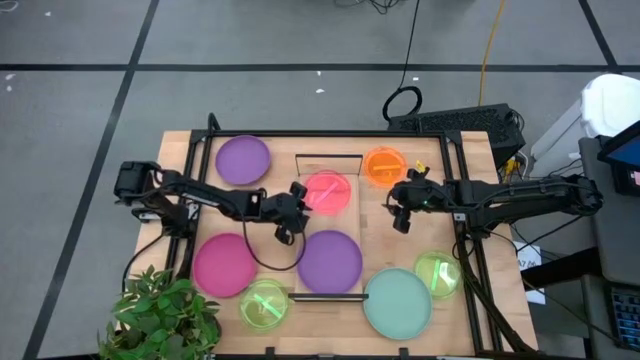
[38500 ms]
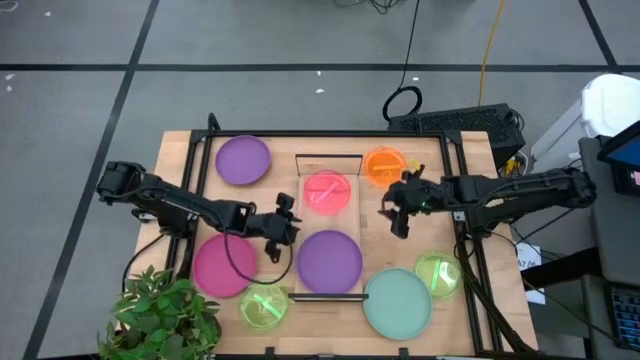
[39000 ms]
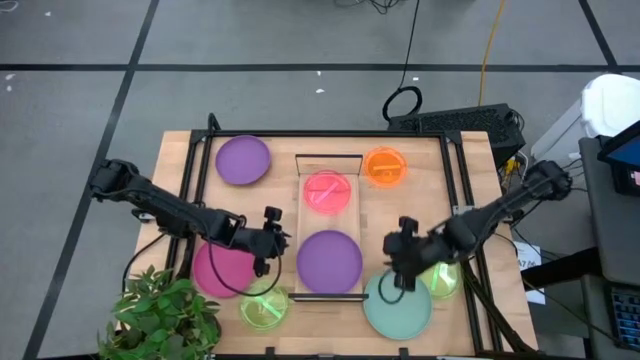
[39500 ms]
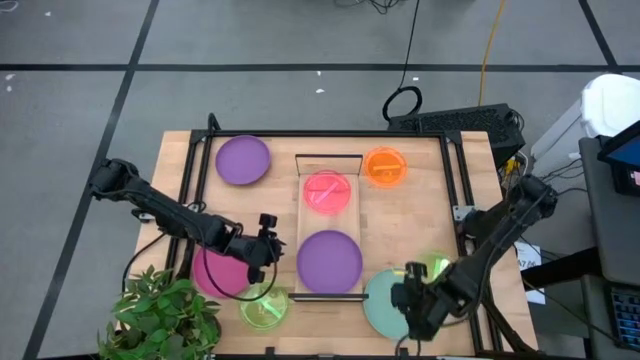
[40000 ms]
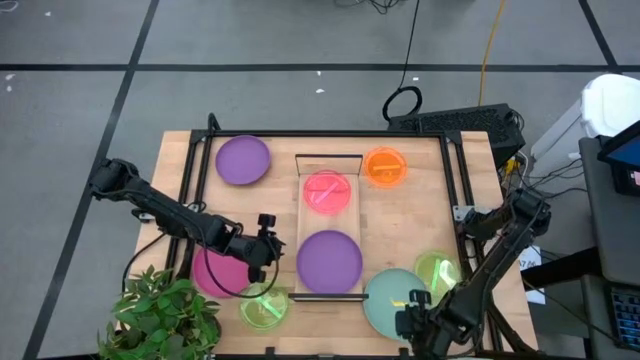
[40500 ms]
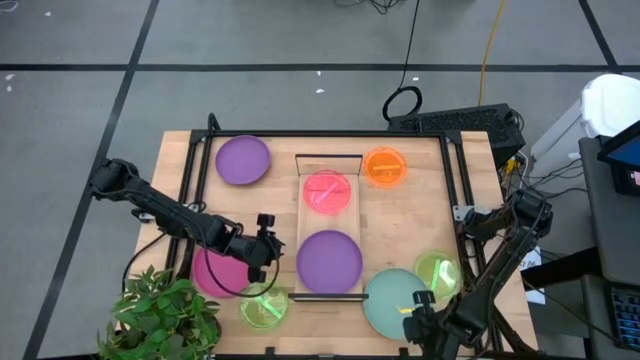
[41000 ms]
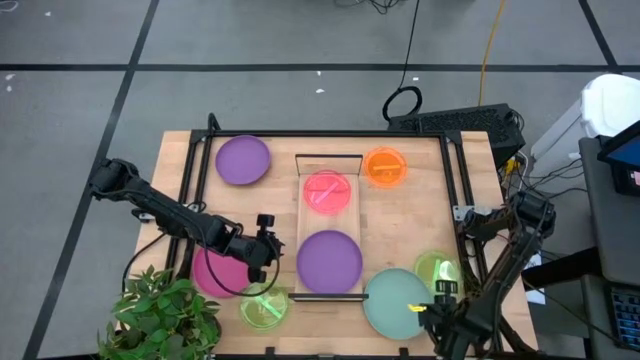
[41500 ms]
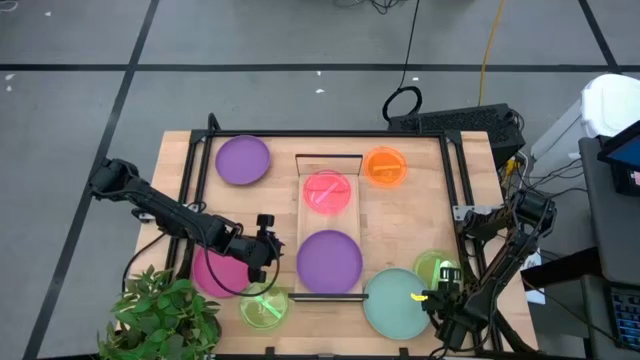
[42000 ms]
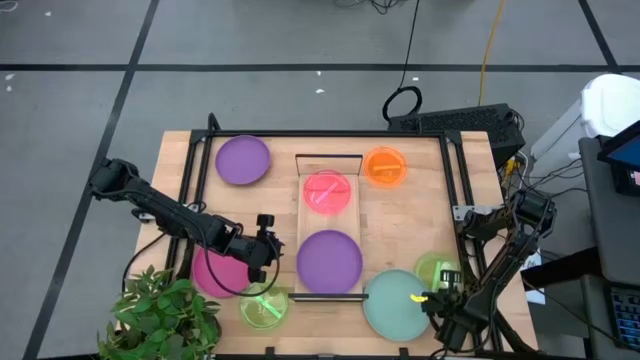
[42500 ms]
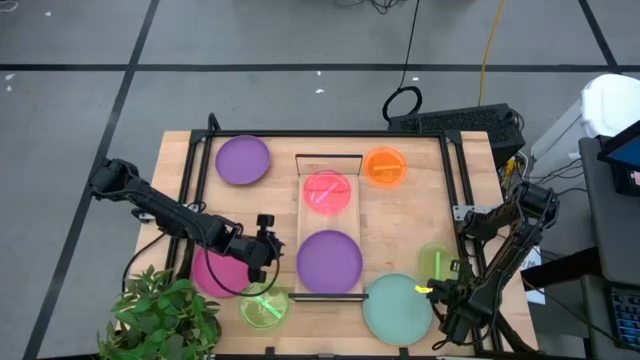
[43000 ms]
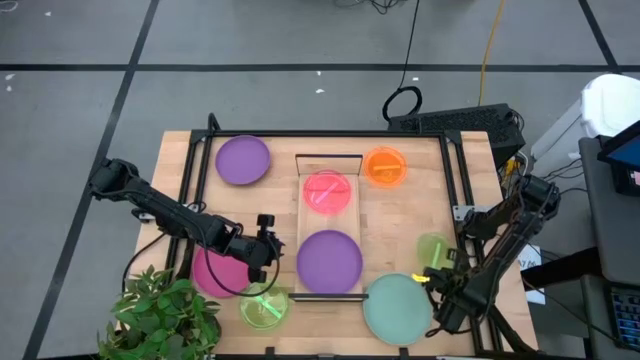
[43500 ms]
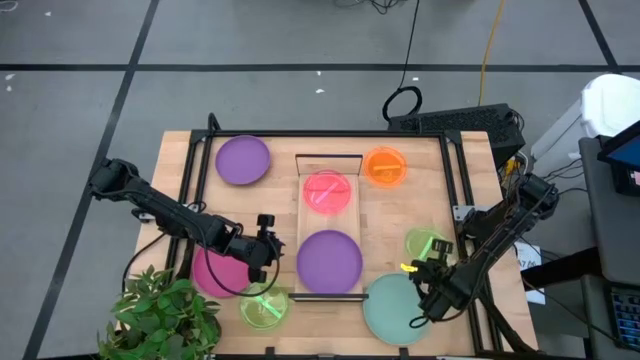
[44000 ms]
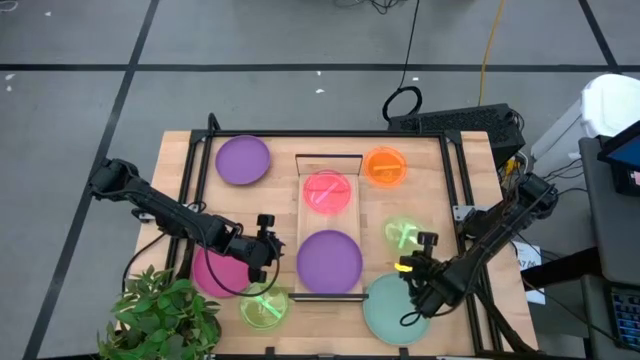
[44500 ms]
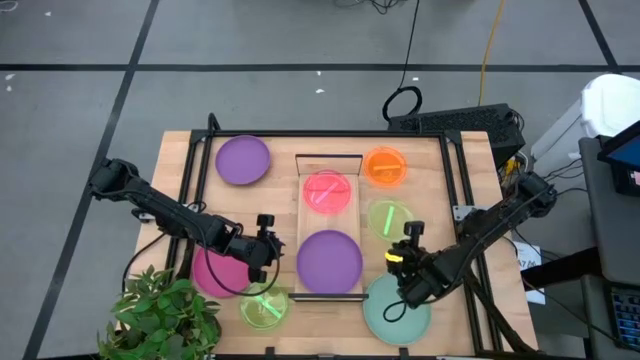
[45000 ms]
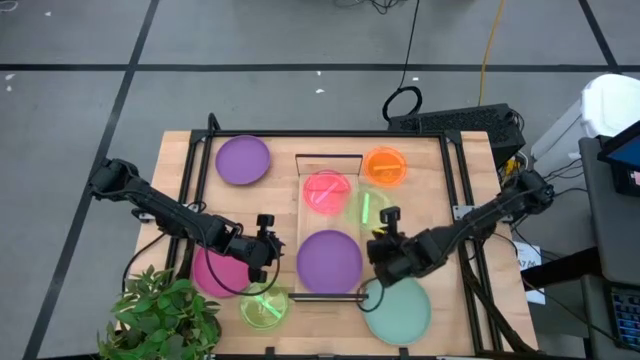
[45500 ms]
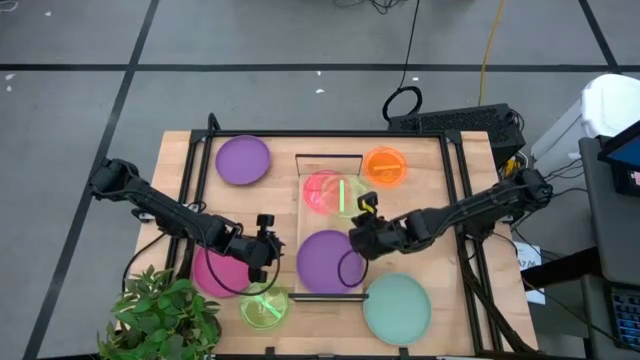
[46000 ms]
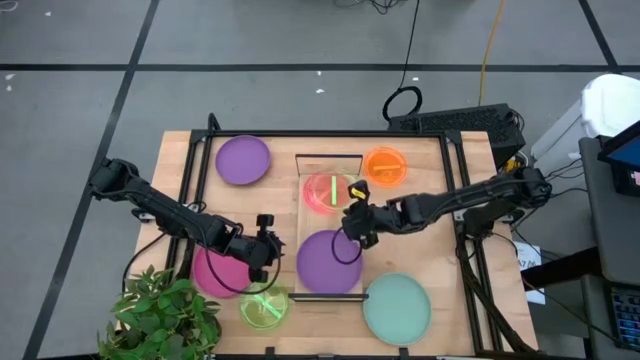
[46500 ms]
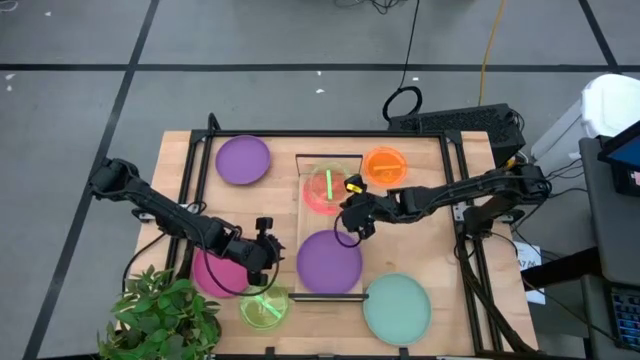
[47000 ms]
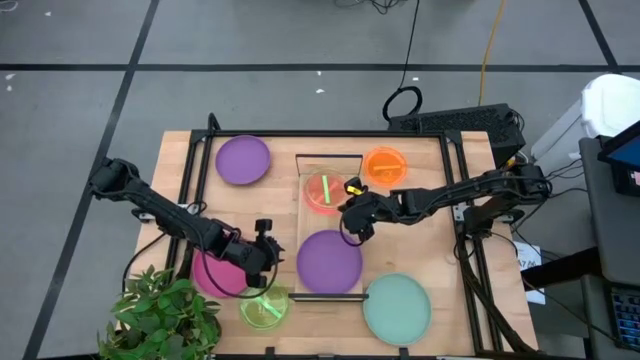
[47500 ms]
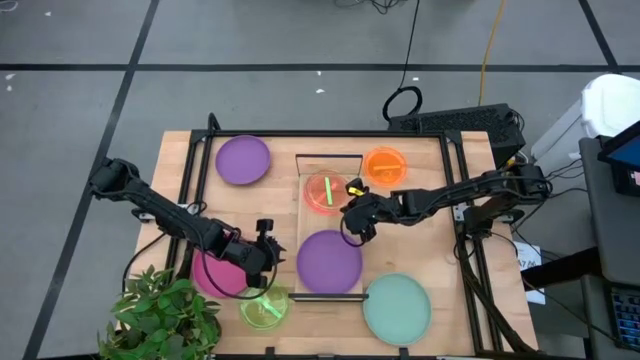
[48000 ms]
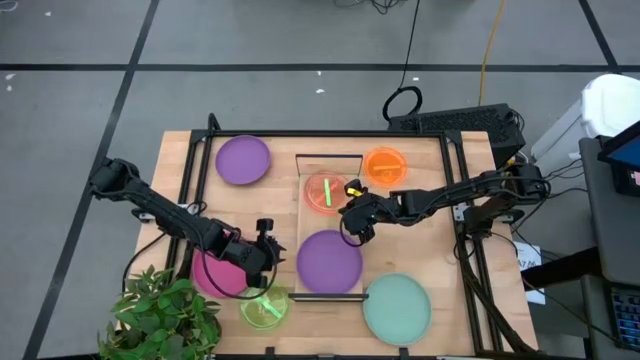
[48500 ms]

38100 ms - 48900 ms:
Task: Place and stack plates onto a shelf
Stack the right small green plate on top of the small pink plate on the shelf

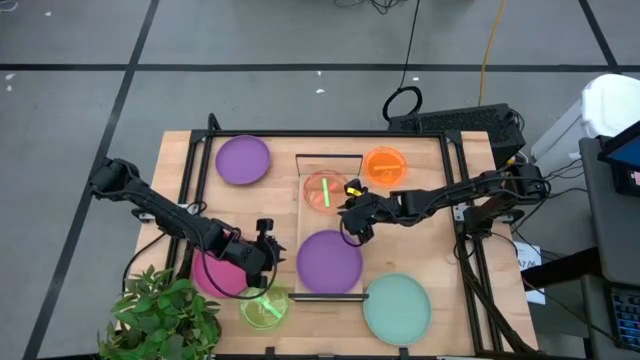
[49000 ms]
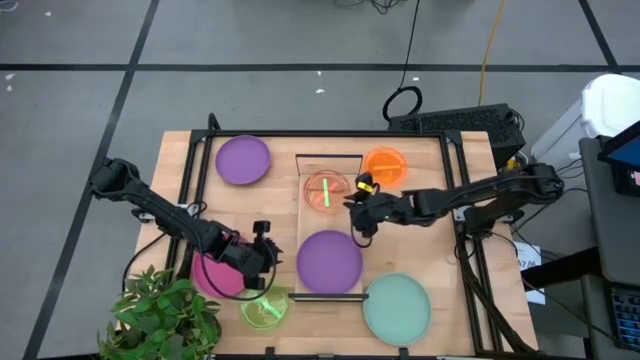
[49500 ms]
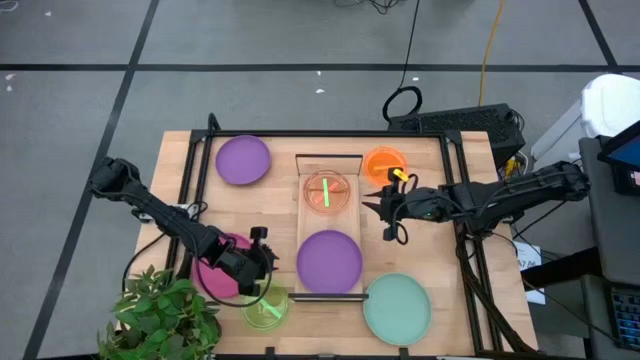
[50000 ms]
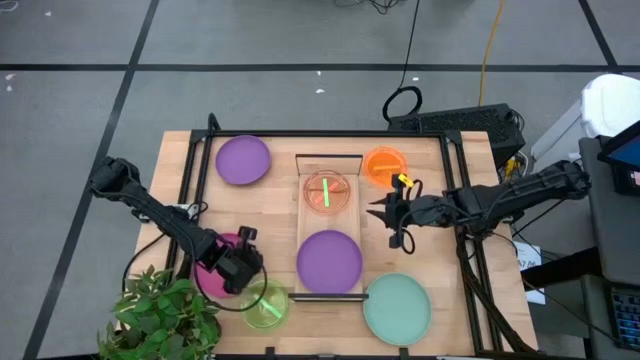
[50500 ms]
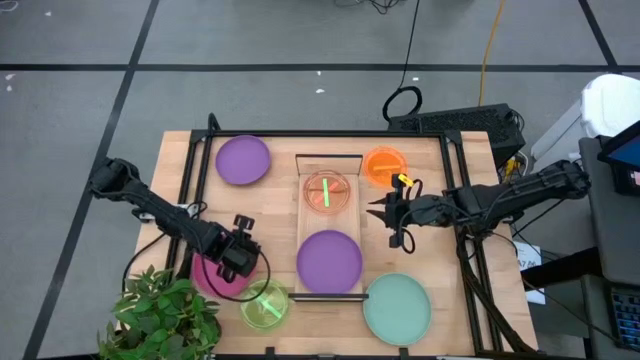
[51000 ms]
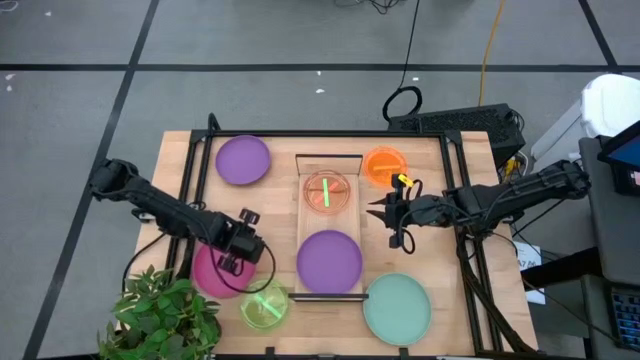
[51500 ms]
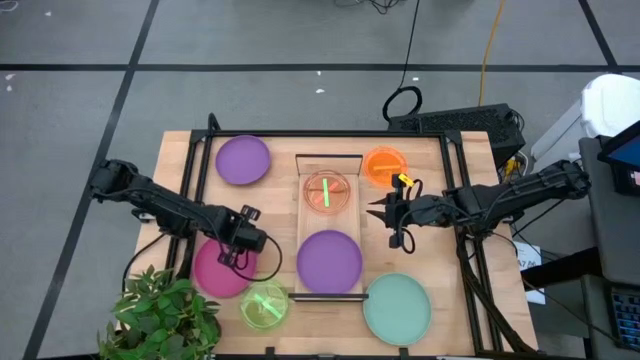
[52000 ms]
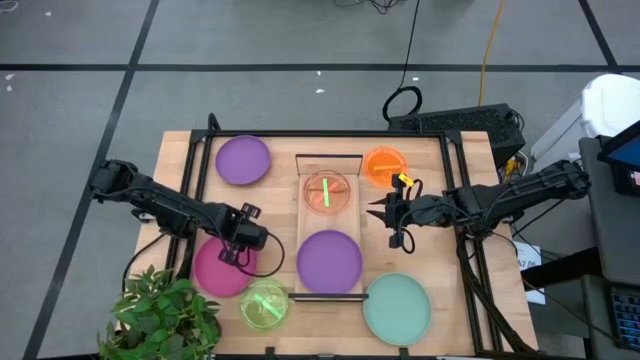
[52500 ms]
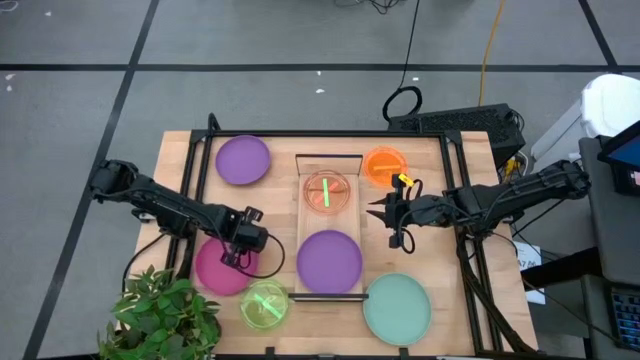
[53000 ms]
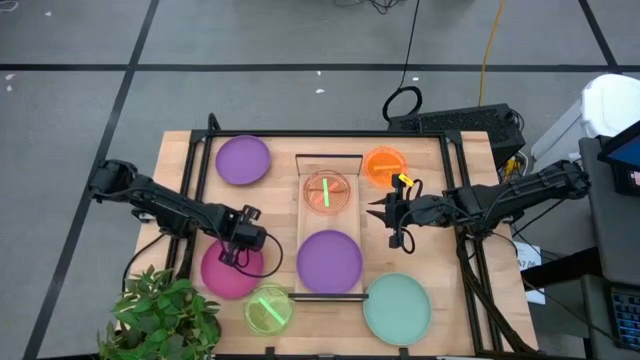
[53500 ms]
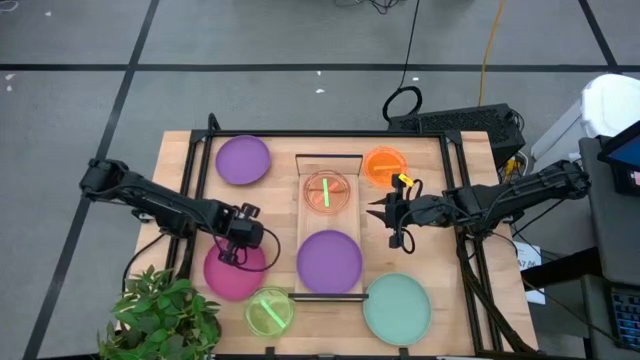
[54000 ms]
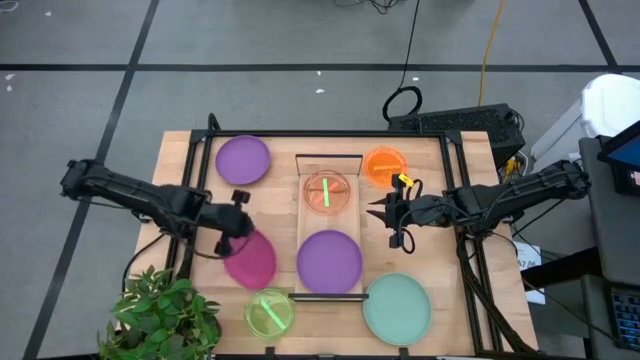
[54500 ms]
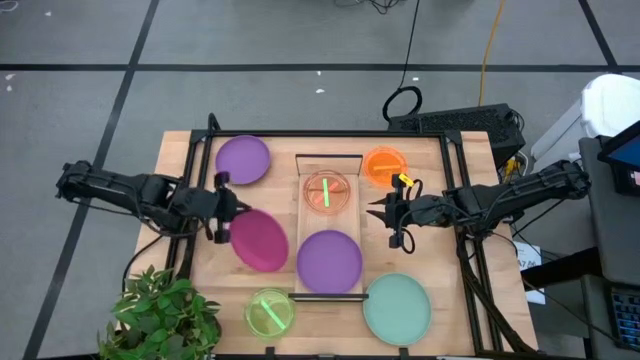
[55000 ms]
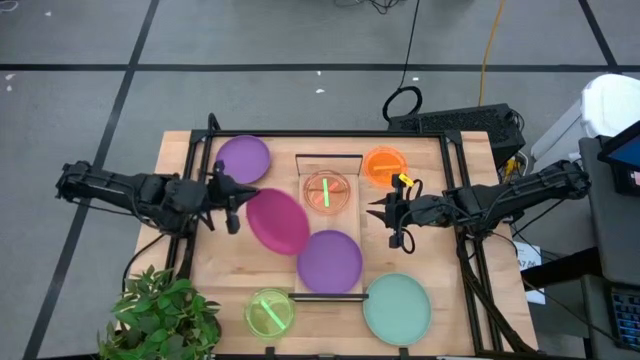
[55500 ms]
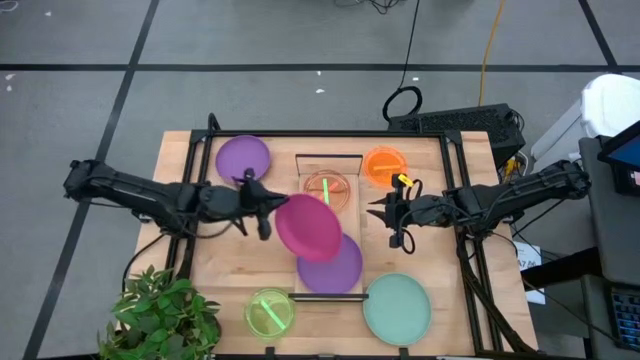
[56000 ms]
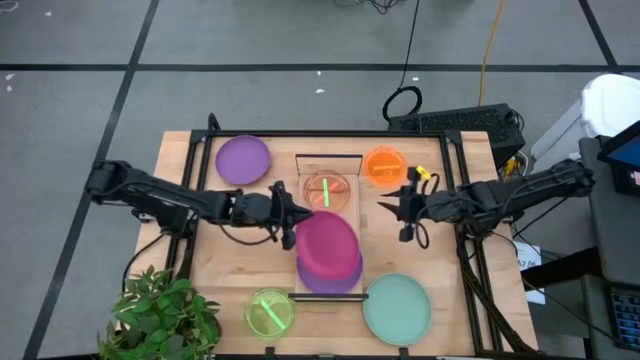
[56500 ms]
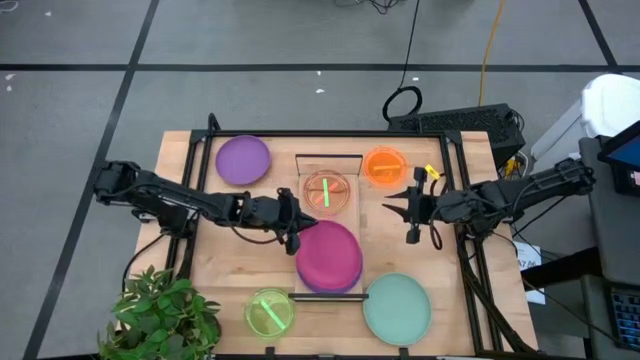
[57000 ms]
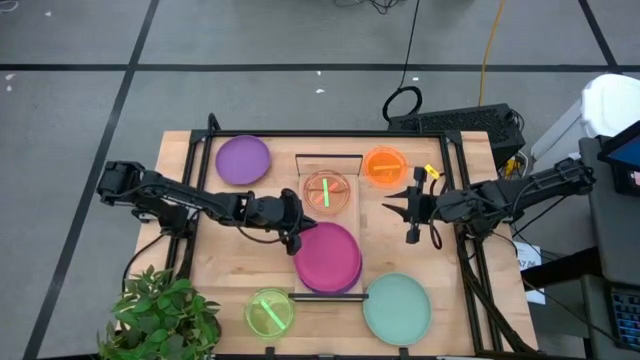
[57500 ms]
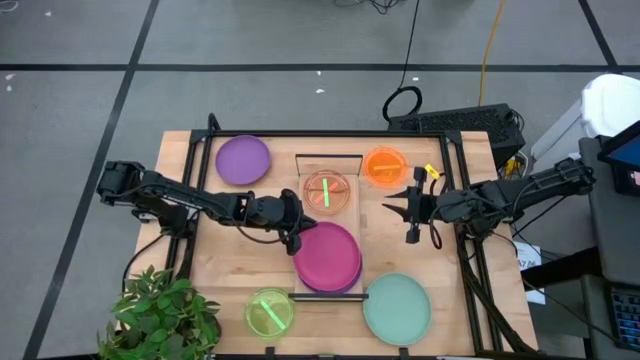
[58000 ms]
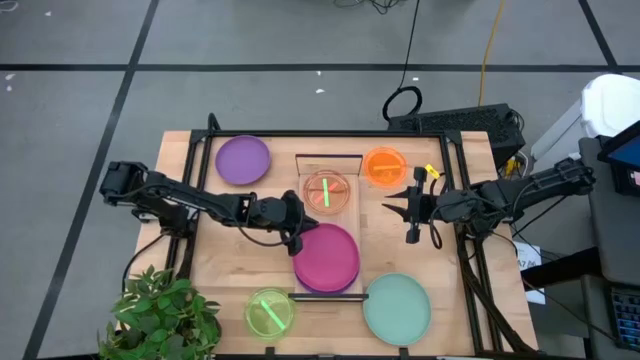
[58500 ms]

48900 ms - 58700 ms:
Stack the large pink plate on top of the large purple plate on the shelf

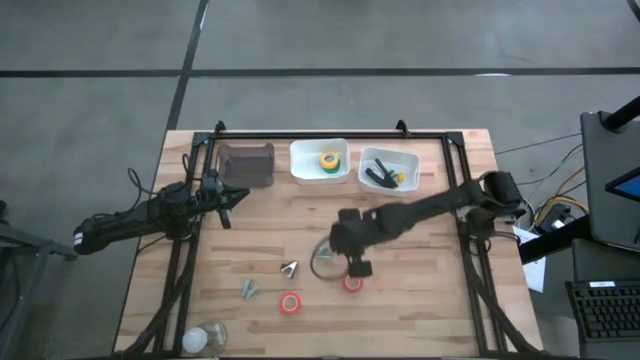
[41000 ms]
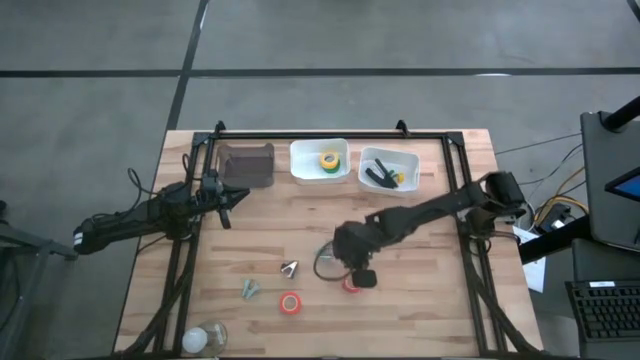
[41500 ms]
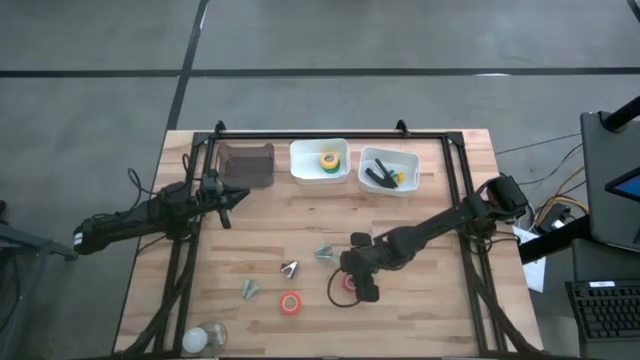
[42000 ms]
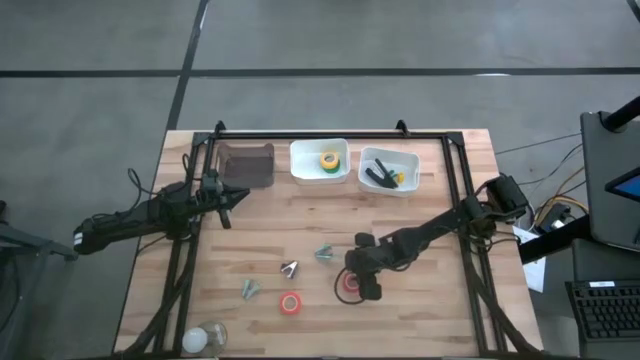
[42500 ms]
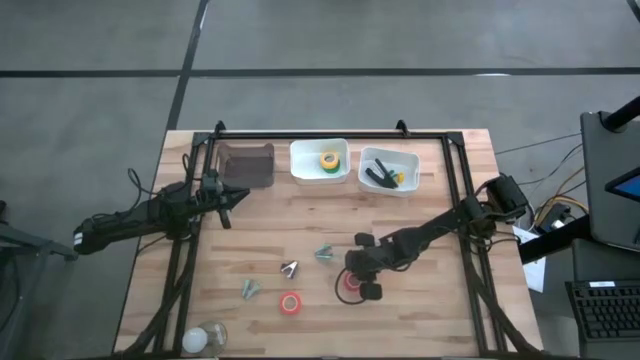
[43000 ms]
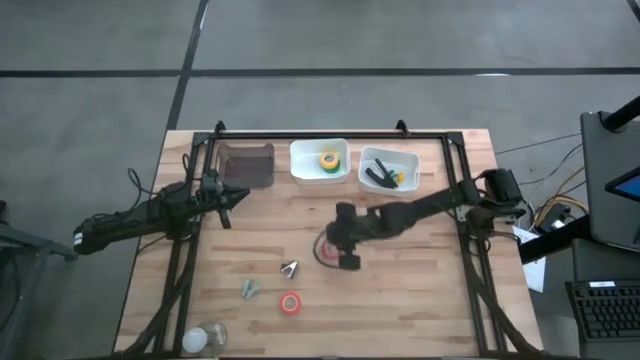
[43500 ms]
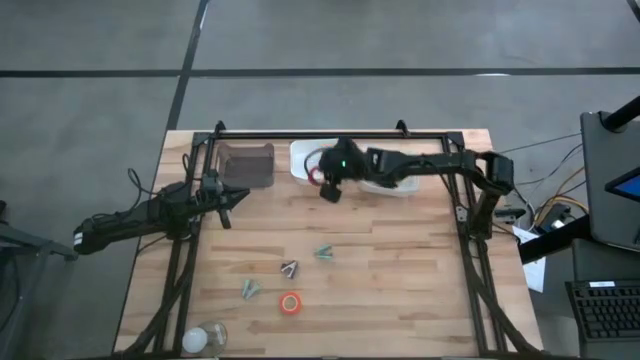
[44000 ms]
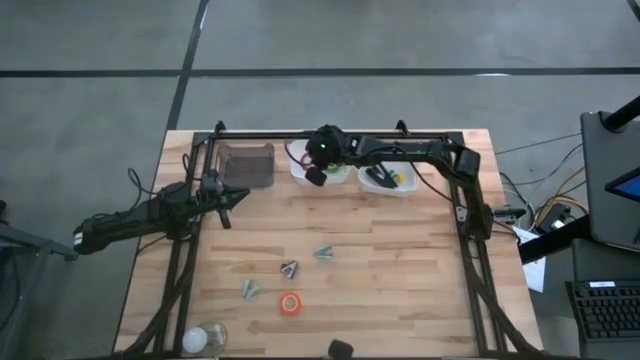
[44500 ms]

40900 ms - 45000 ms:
Task: Pick and place Stapler, Stapler remover, tape
Put the red tape into the left white bin
